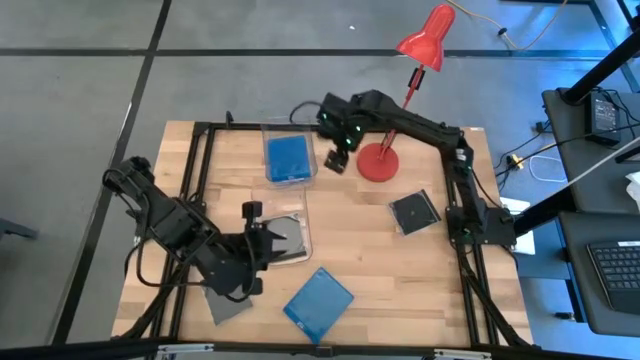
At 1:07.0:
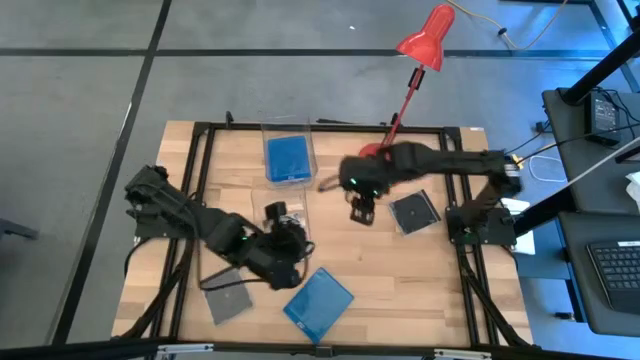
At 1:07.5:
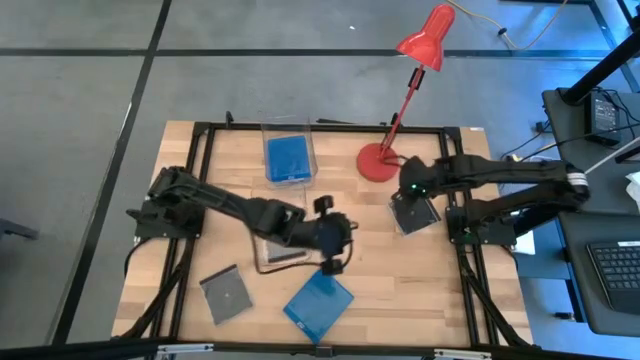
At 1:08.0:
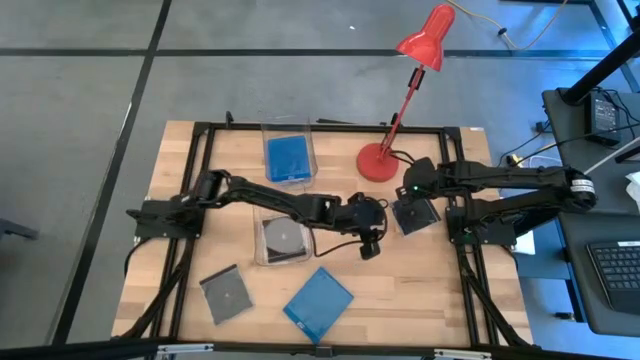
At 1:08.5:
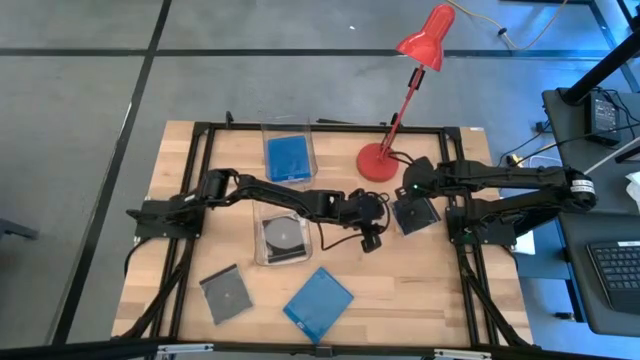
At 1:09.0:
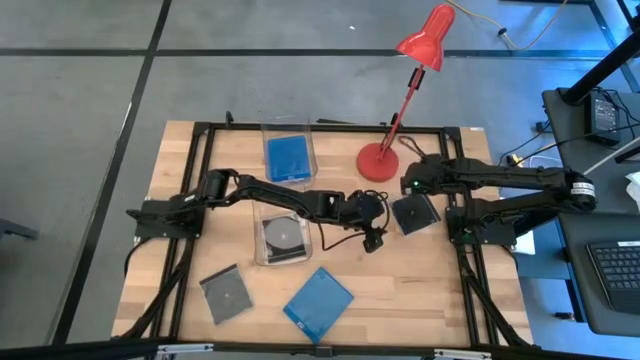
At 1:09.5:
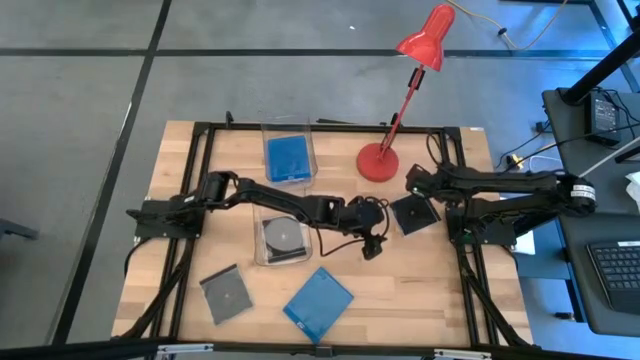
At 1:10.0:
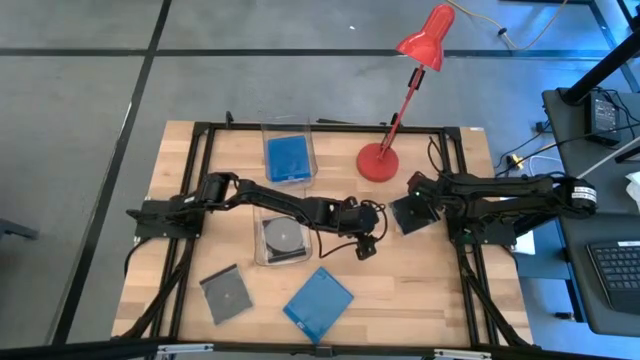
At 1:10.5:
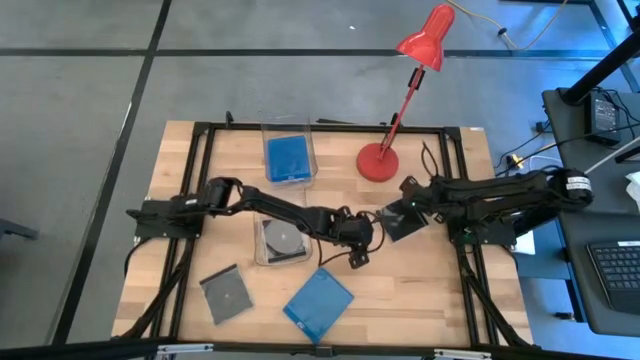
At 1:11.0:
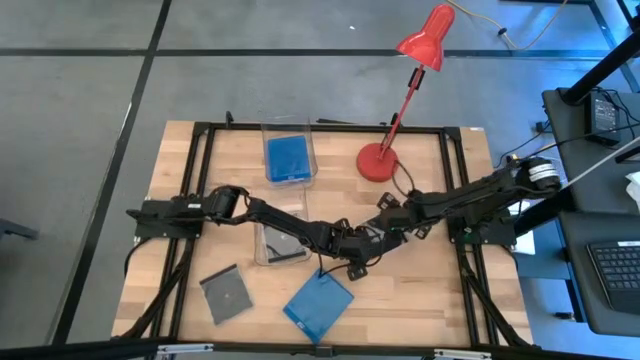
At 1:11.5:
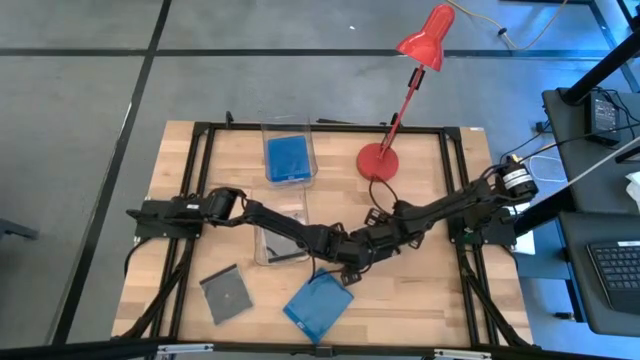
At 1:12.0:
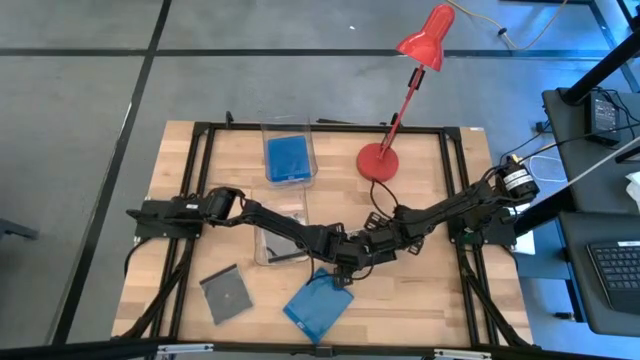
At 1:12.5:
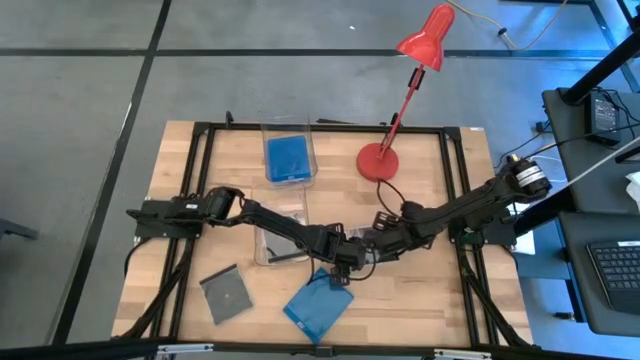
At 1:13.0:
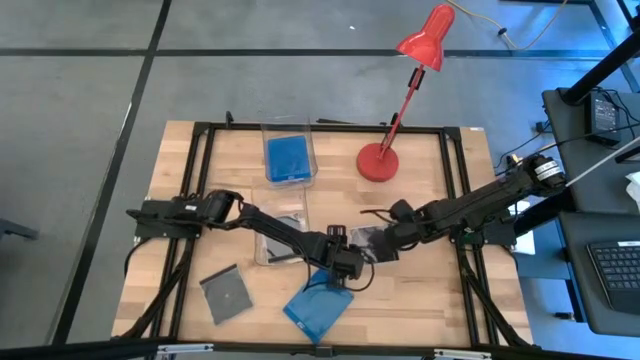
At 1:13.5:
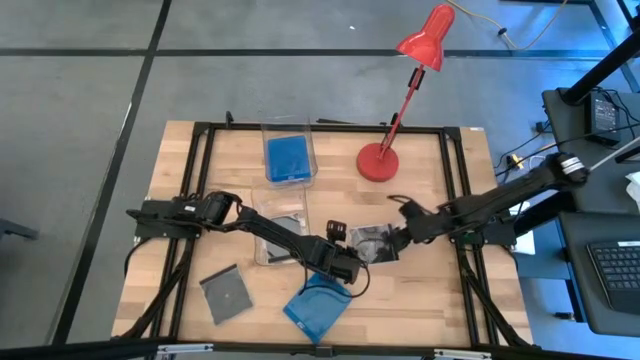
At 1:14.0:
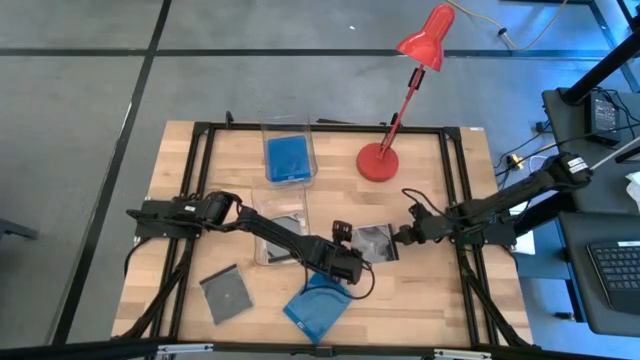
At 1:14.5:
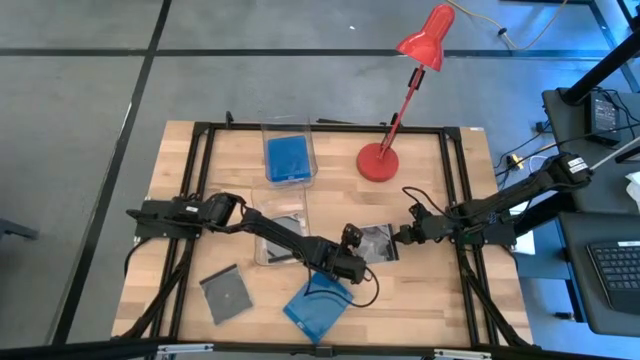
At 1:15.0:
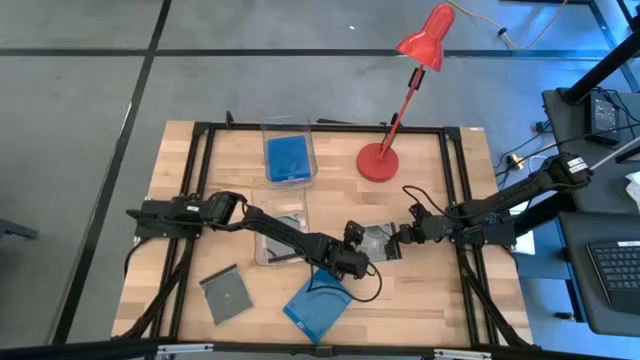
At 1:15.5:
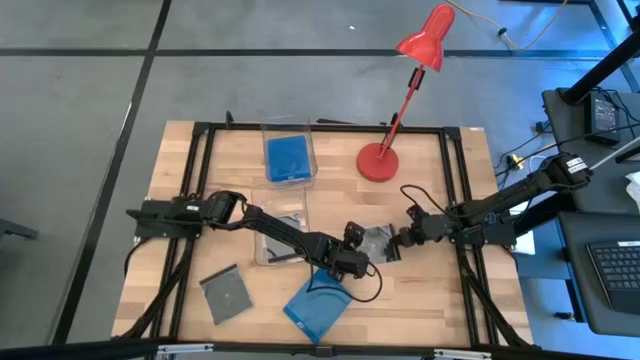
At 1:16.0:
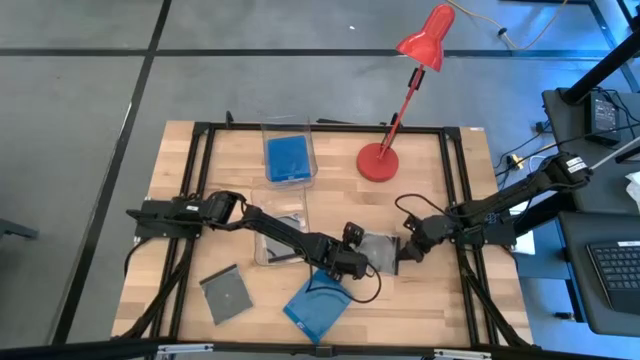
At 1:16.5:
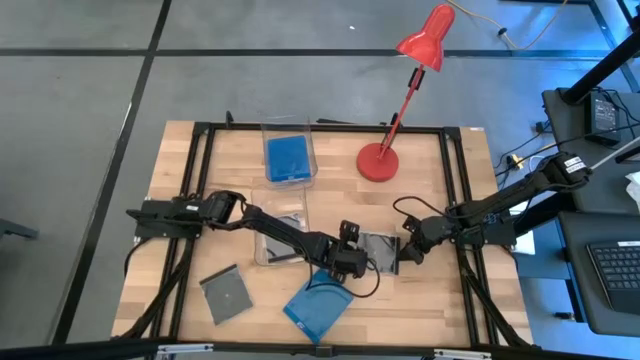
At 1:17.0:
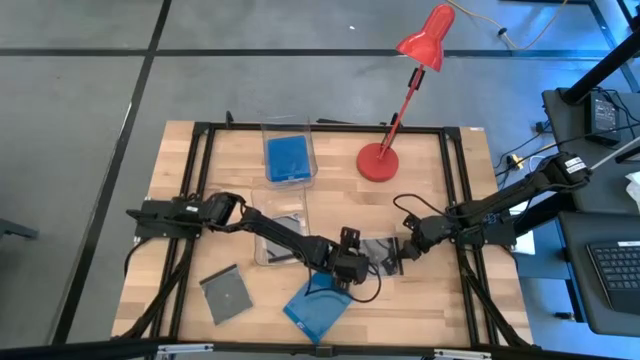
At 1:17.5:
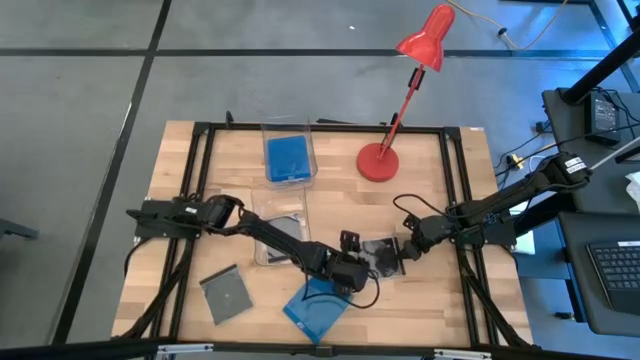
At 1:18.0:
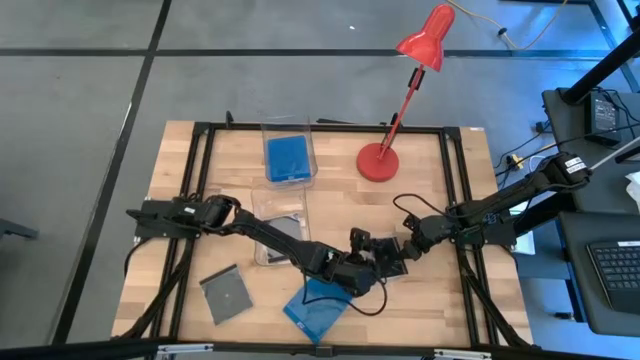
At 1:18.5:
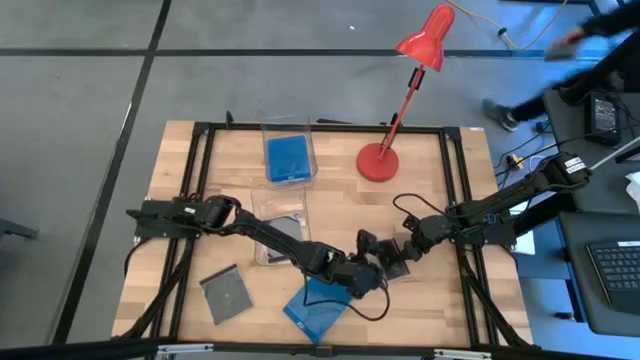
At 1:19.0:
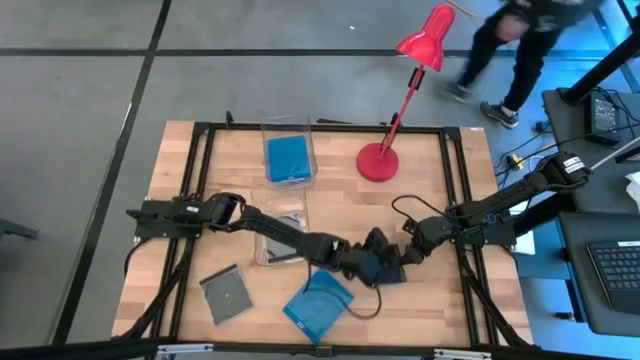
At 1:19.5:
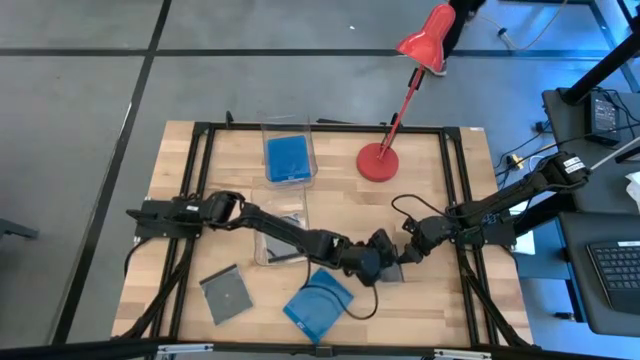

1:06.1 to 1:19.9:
Task: Pick & place jewel cases by type
Put the top black cd case into the bottom transparent bin

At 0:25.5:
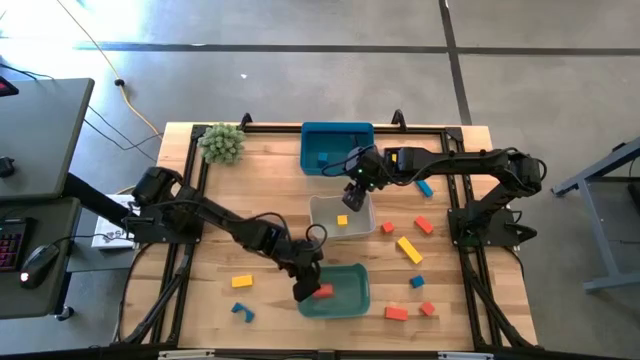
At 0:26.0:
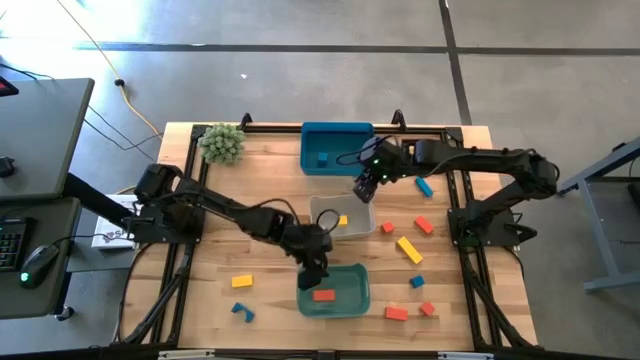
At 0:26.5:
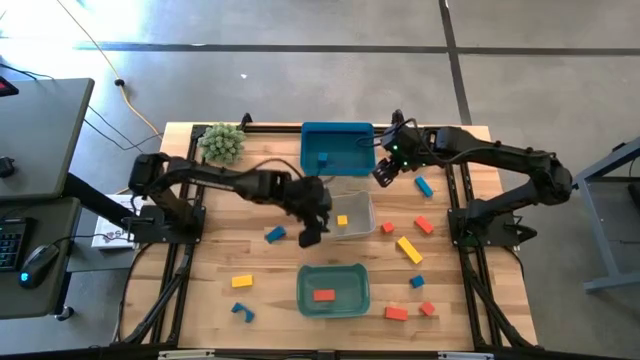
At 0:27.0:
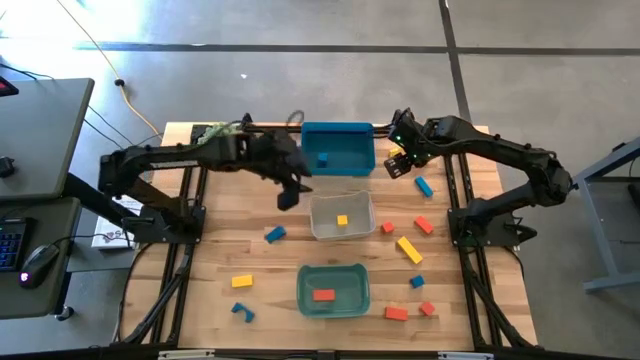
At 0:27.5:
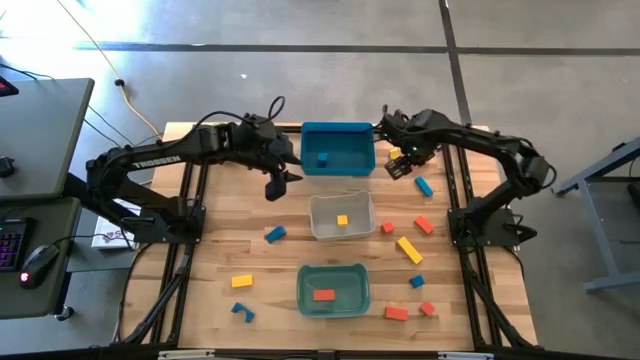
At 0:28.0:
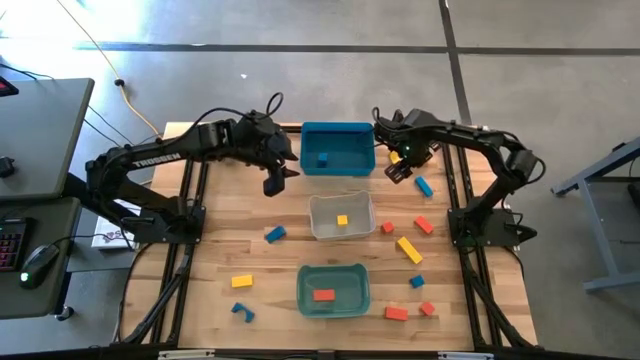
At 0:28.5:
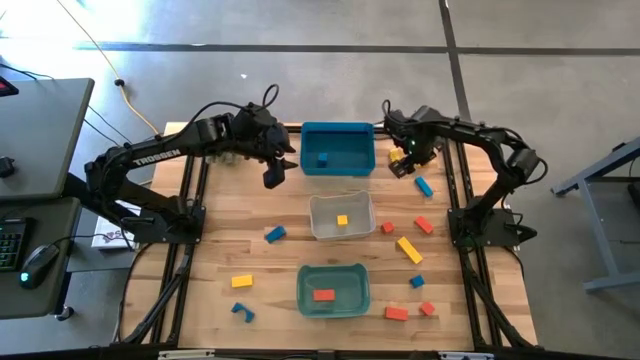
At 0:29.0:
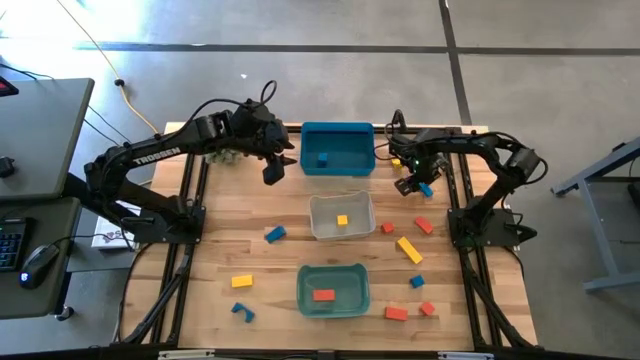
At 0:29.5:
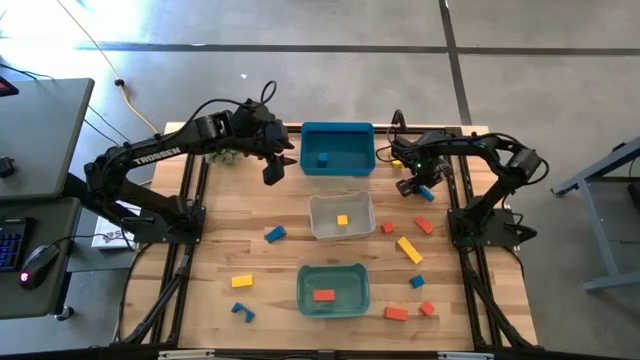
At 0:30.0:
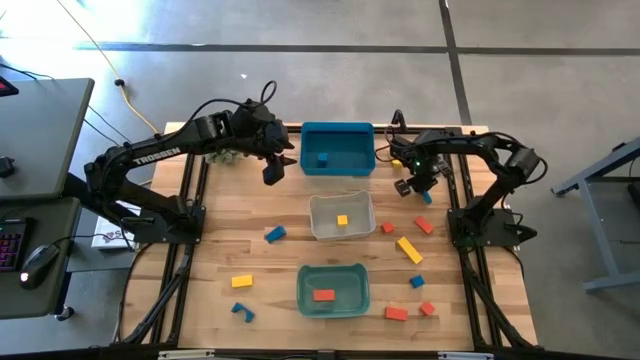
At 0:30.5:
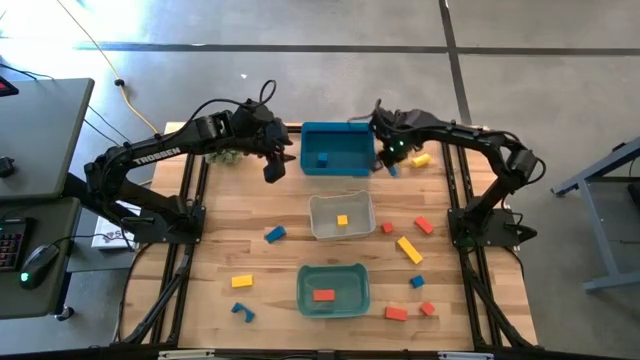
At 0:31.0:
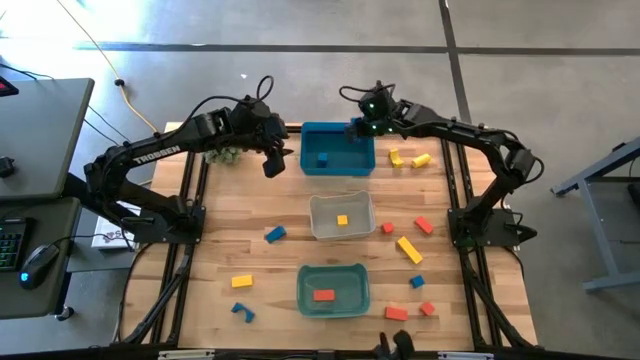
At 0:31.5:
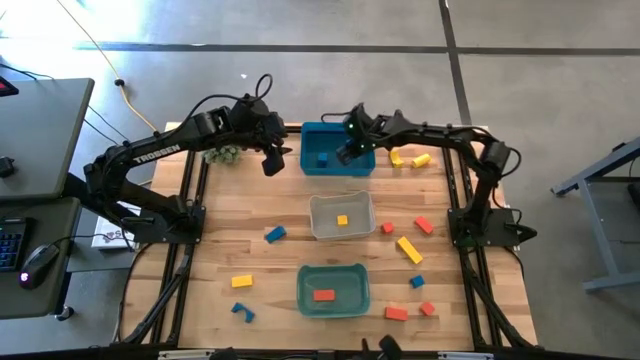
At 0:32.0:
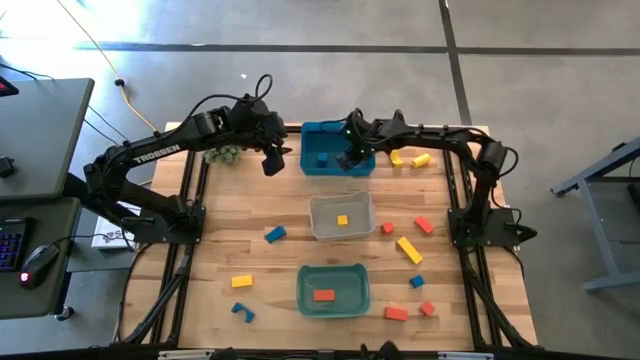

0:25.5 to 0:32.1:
Task: Sort & place blocks by color
Put the blue block into the blue bin
